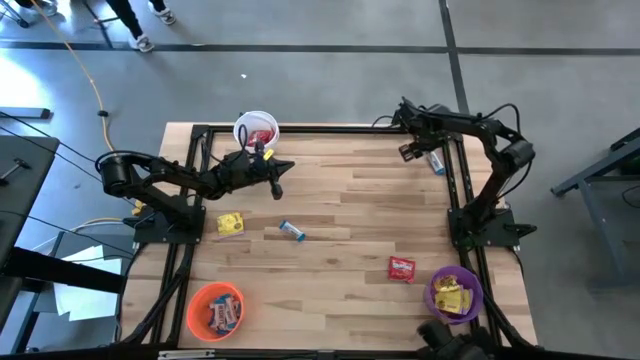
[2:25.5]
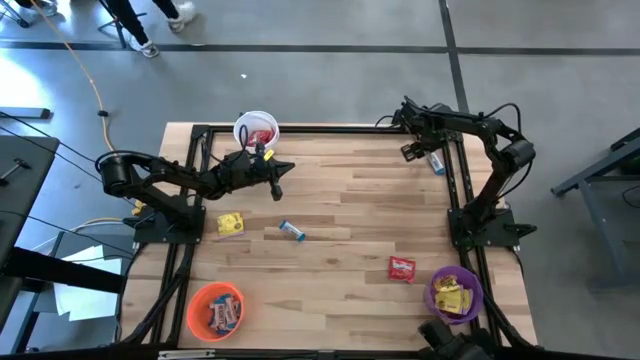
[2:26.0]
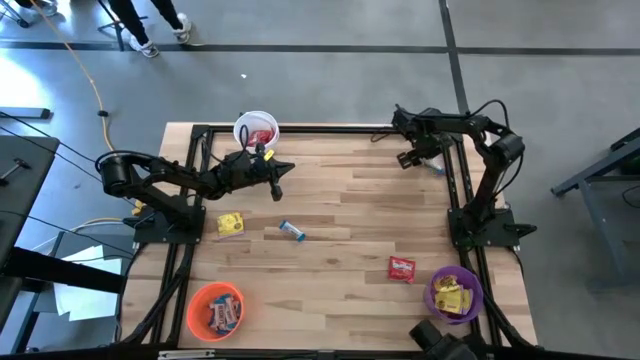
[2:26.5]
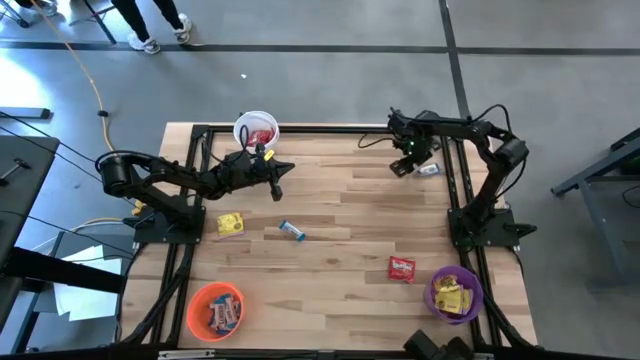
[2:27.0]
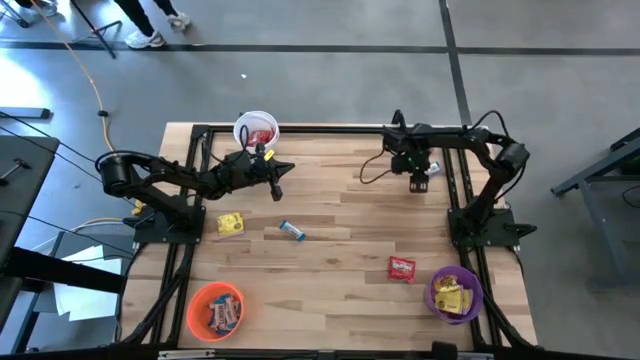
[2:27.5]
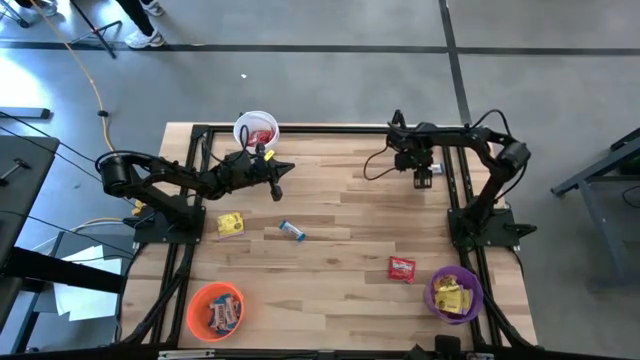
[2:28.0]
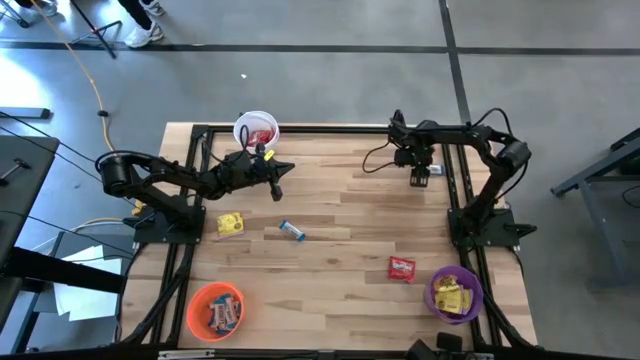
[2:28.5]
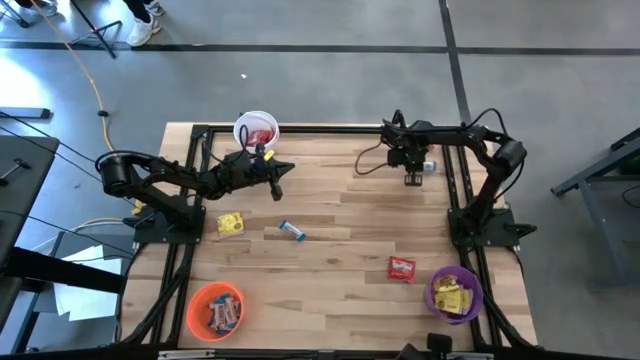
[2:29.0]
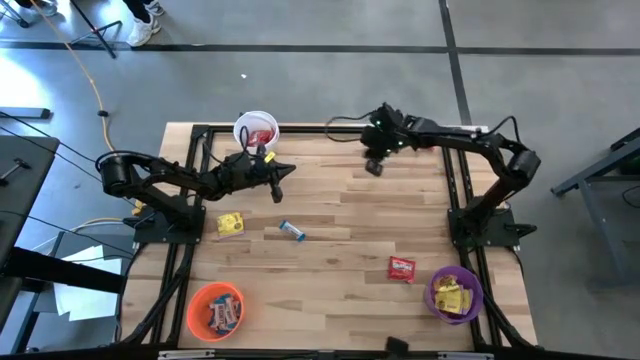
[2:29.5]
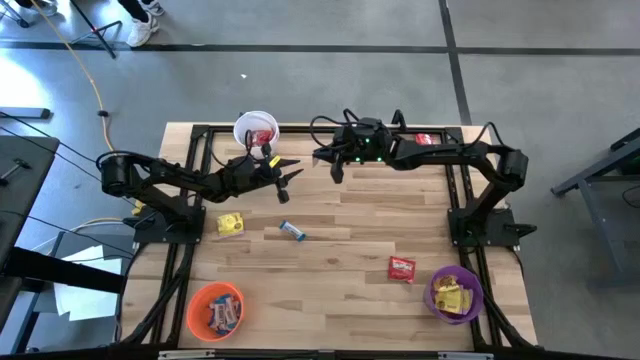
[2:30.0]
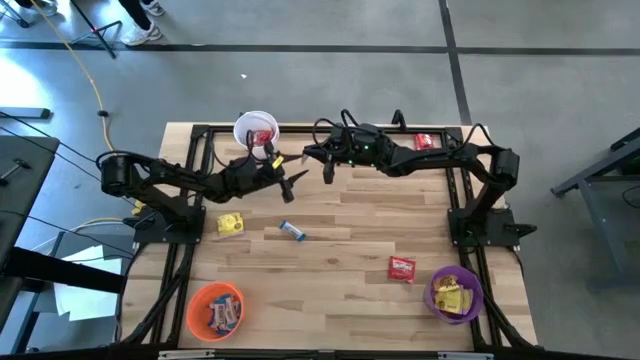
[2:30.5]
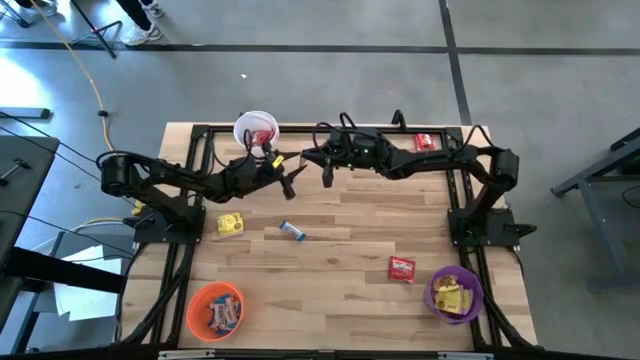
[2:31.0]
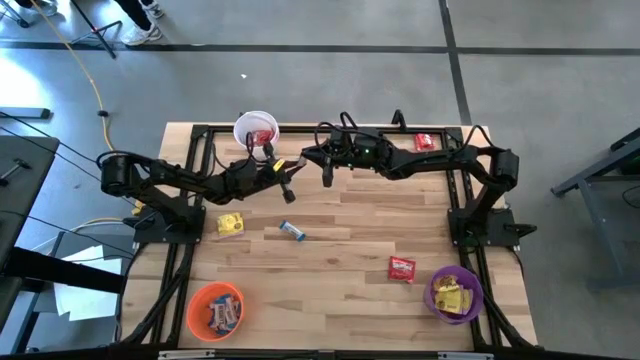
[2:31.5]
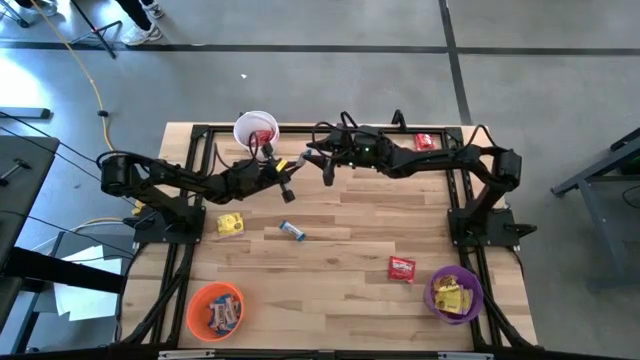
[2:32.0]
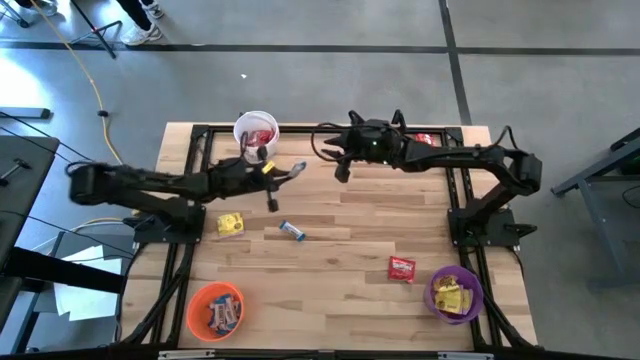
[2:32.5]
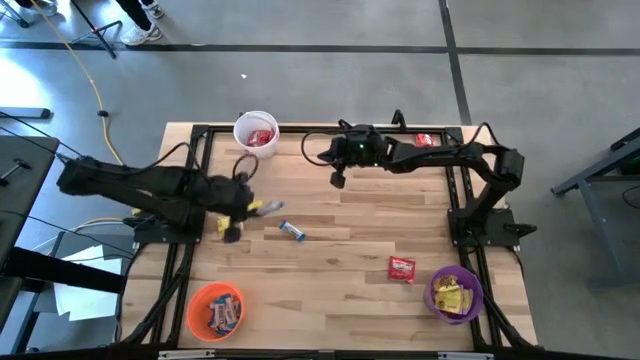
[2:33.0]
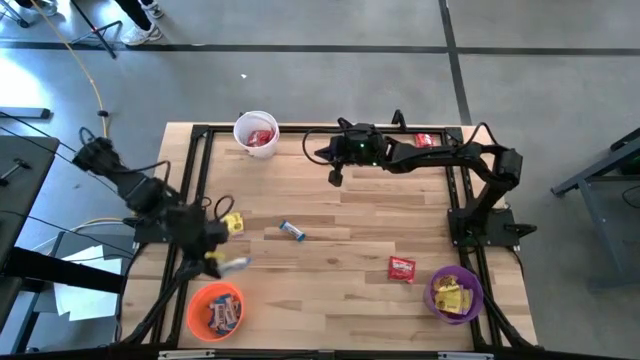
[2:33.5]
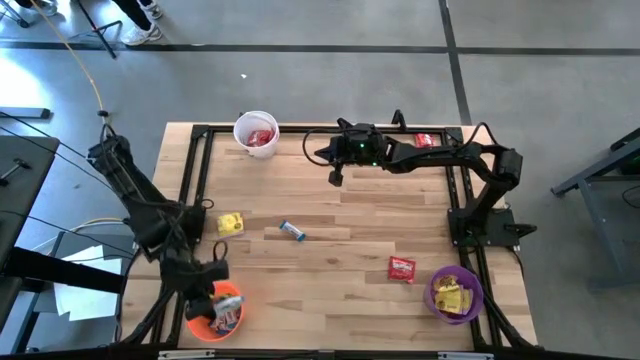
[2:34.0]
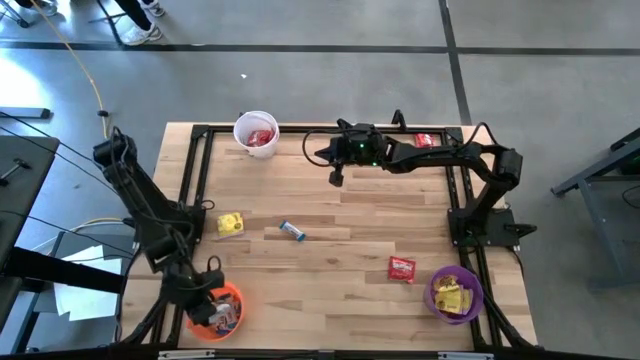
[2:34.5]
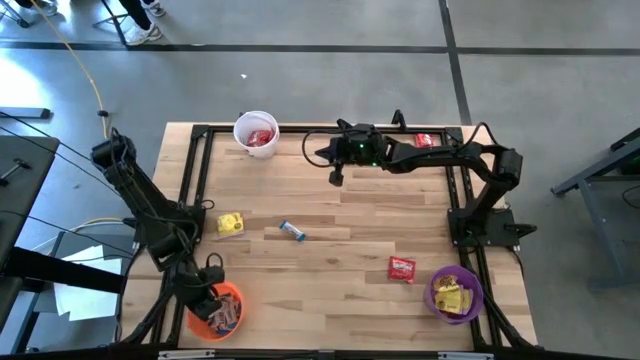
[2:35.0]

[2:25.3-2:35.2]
Task: Sort candy
Put the white candy into the orange bucket

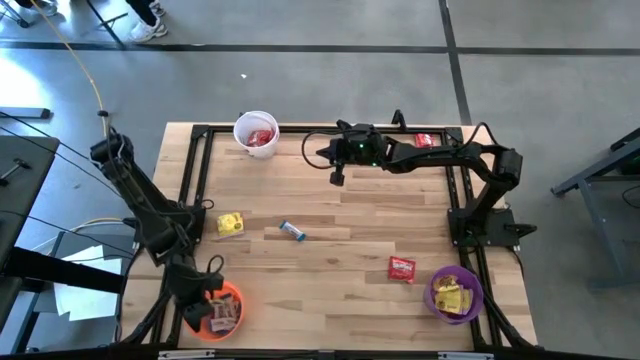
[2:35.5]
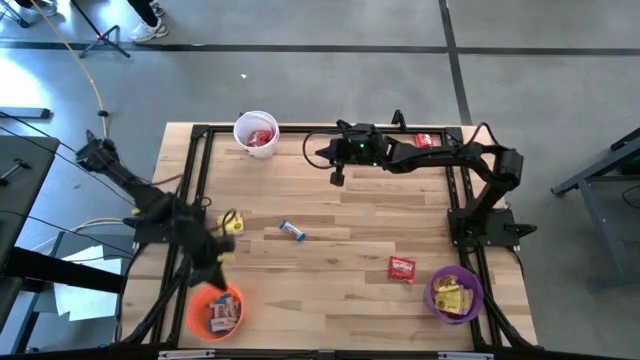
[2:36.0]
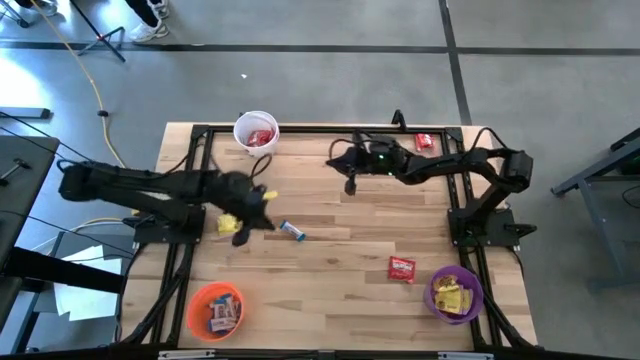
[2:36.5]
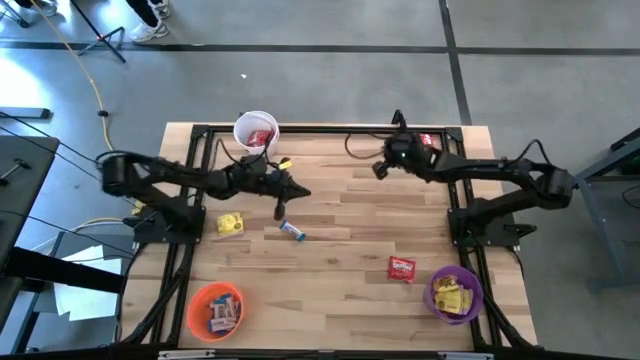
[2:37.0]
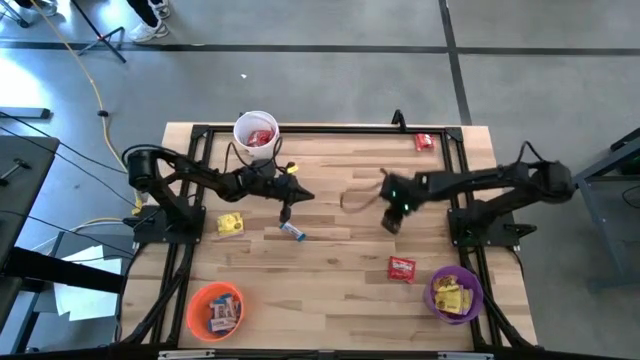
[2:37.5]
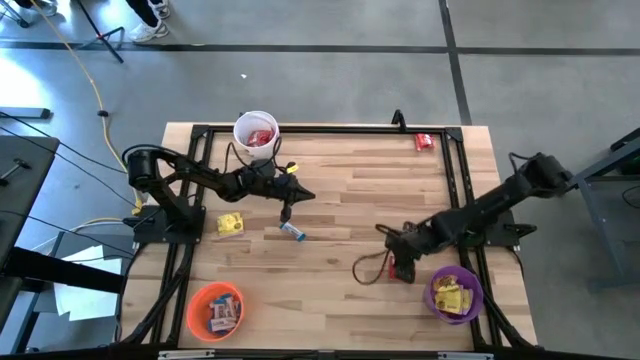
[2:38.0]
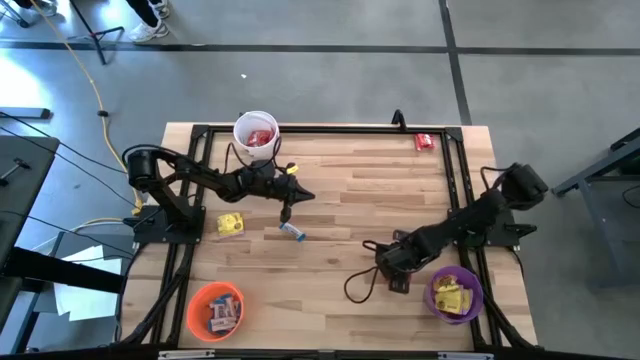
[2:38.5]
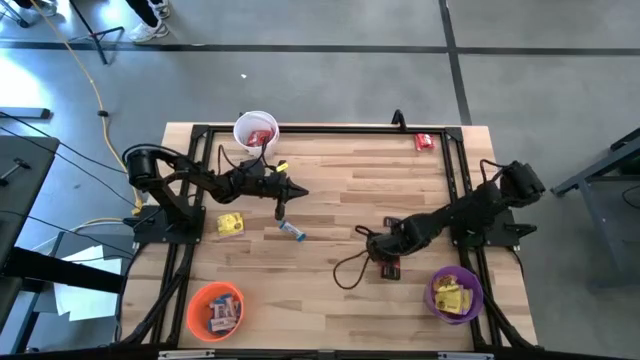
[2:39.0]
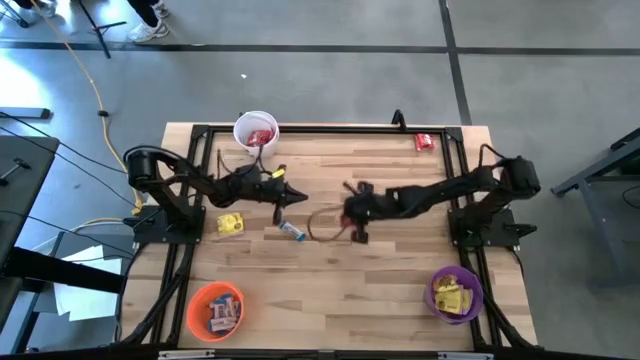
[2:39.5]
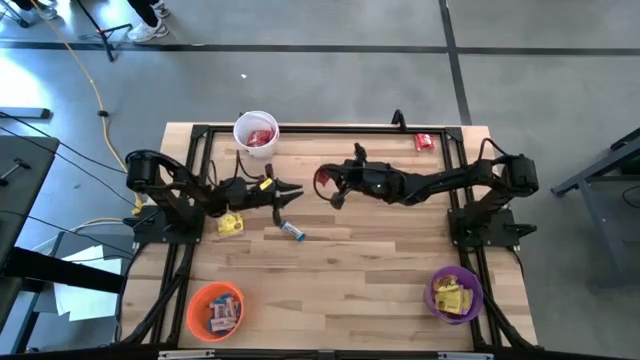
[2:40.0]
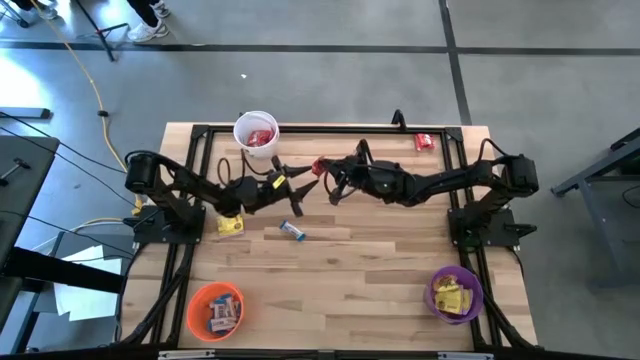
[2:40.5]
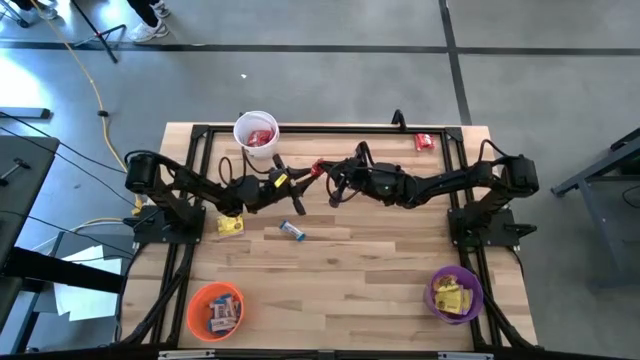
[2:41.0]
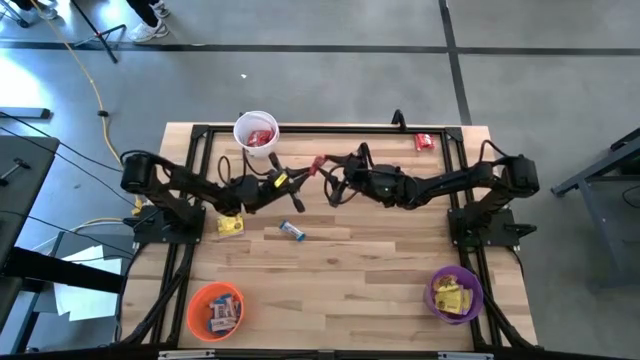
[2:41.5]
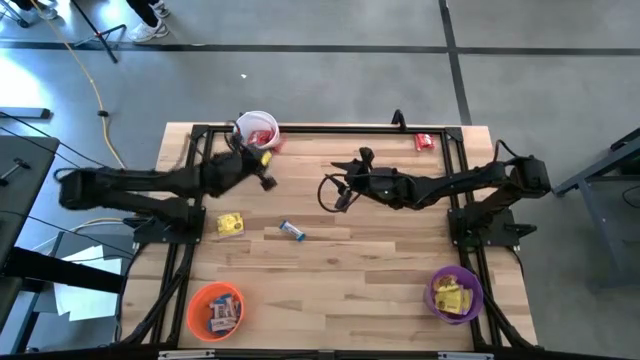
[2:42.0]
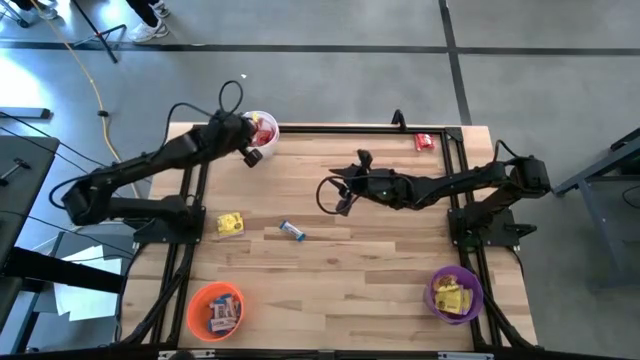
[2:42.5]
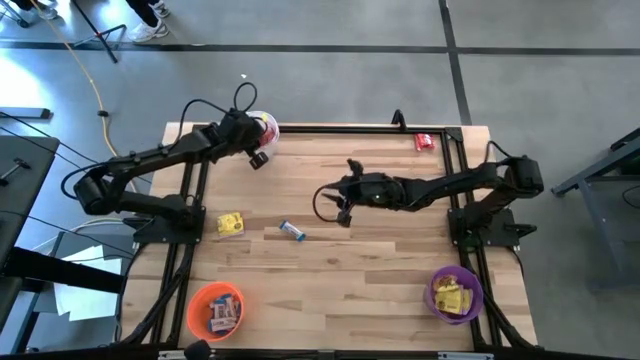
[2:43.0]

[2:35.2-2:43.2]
Put the red candy into the white bucket

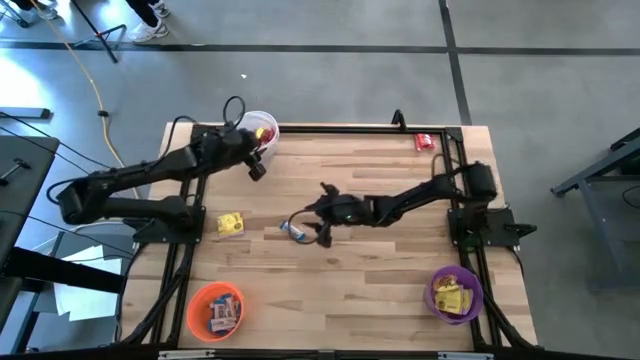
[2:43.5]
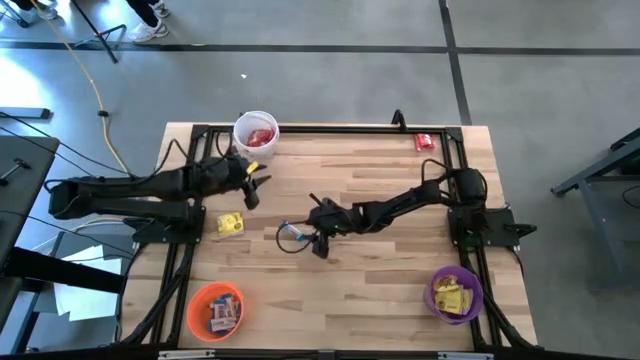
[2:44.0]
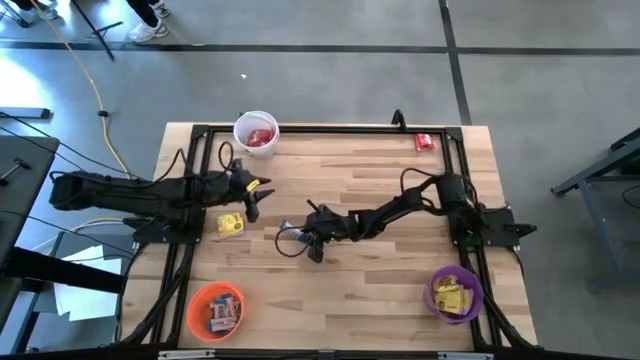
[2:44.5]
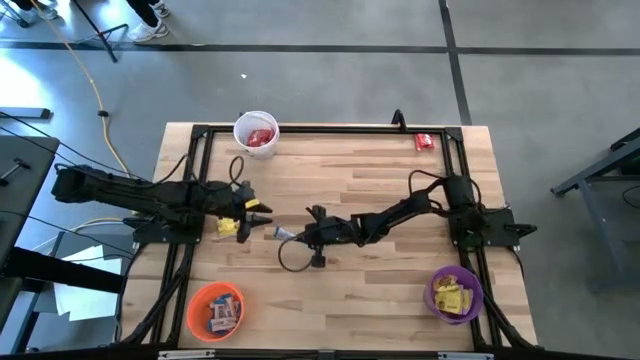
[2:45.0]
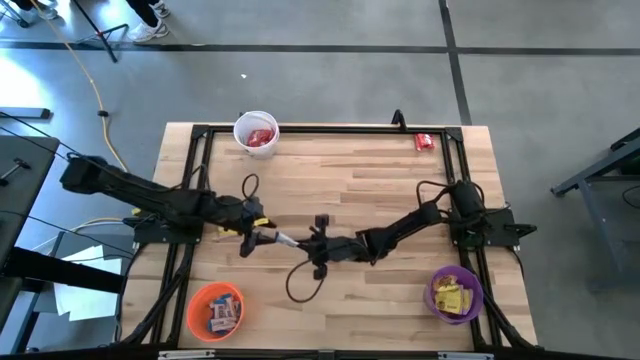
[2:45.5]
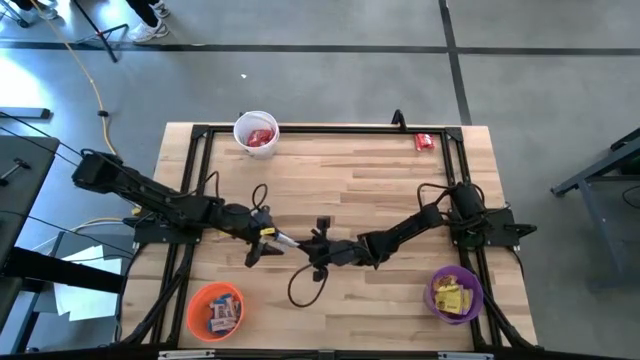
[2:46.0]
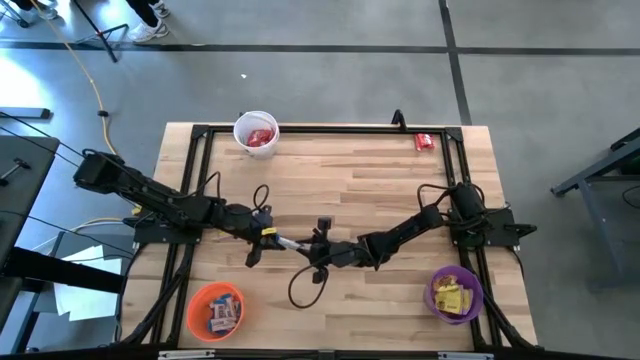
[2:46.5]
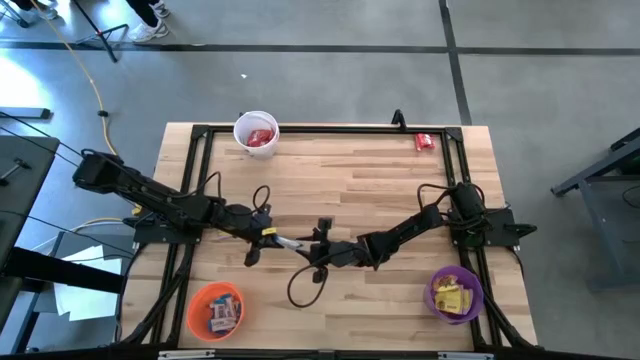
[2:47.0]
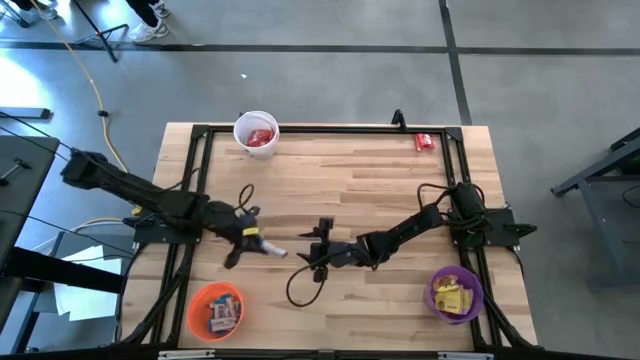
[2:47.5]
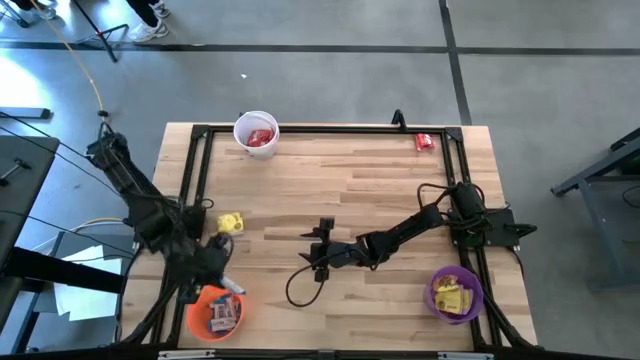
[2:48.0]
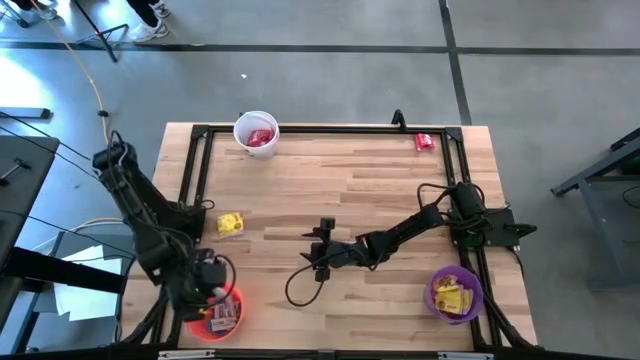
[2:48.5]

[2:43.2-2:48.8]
Put the white candy into the orange bucket
